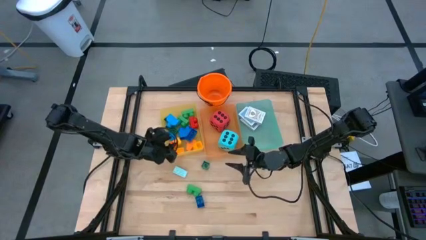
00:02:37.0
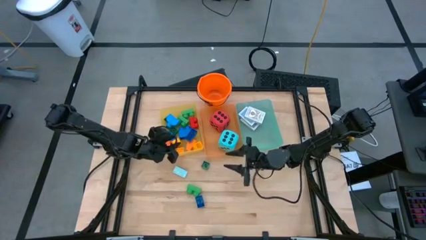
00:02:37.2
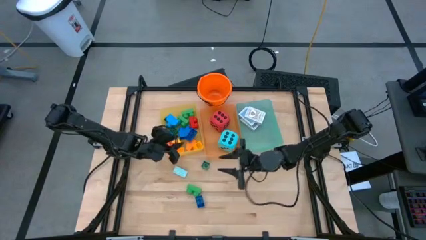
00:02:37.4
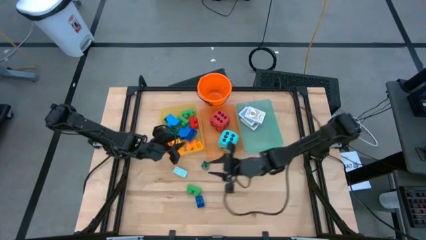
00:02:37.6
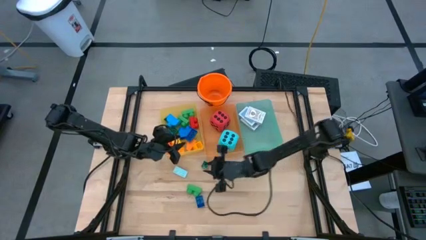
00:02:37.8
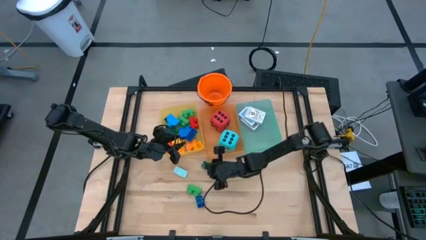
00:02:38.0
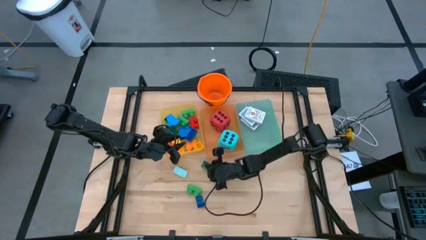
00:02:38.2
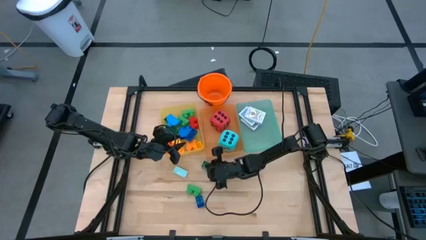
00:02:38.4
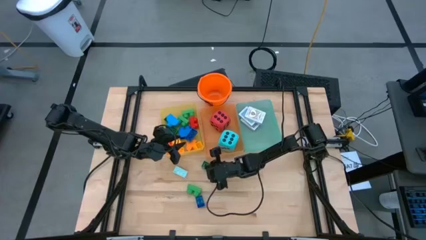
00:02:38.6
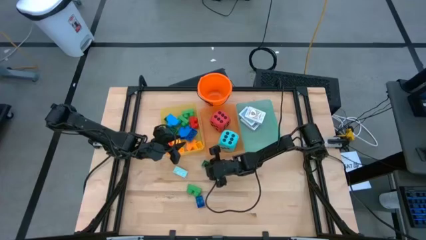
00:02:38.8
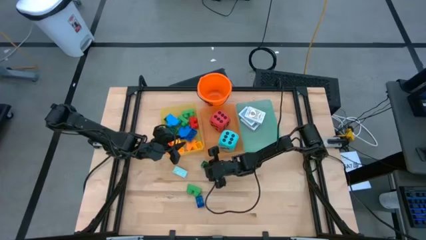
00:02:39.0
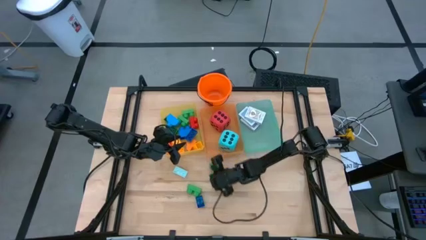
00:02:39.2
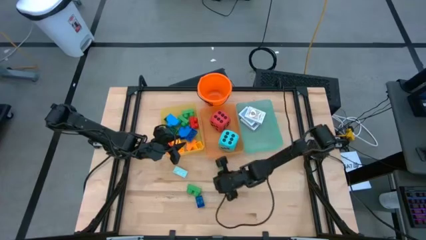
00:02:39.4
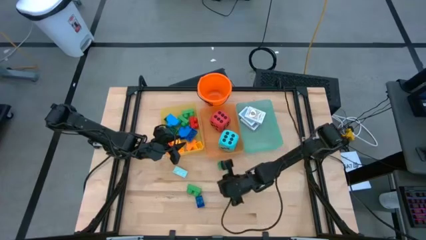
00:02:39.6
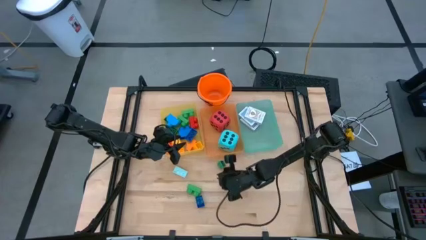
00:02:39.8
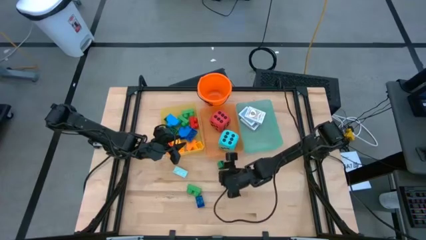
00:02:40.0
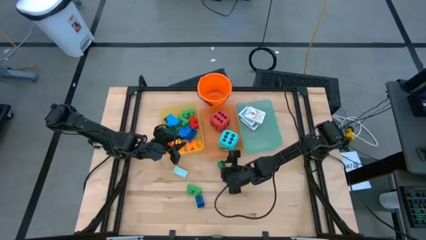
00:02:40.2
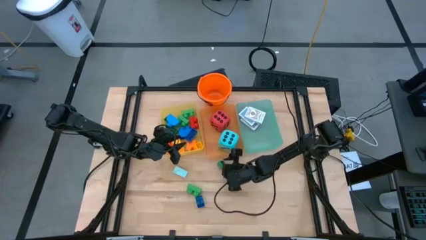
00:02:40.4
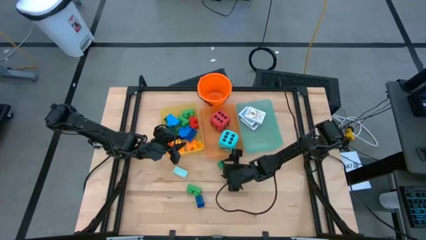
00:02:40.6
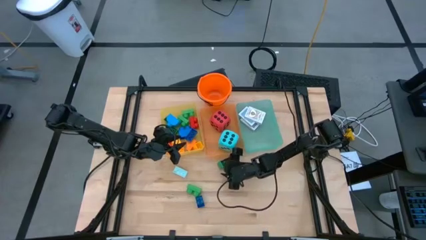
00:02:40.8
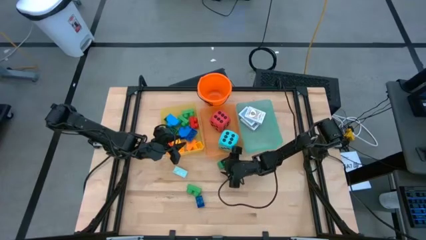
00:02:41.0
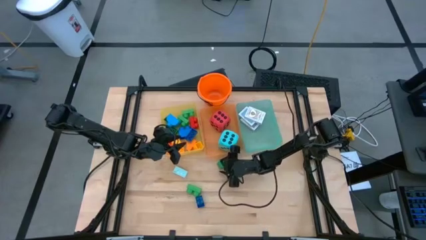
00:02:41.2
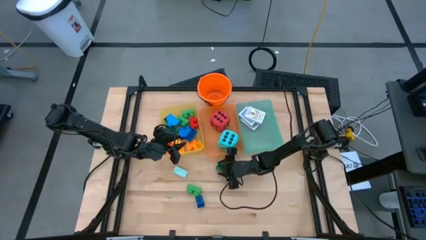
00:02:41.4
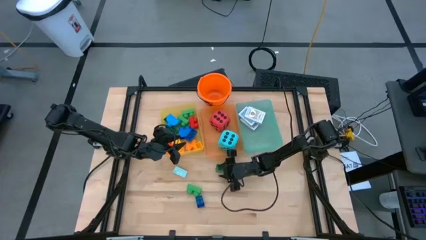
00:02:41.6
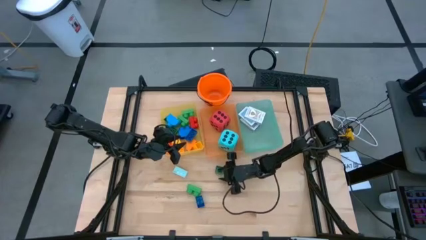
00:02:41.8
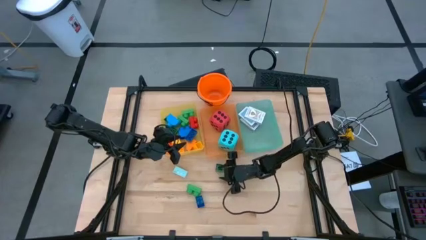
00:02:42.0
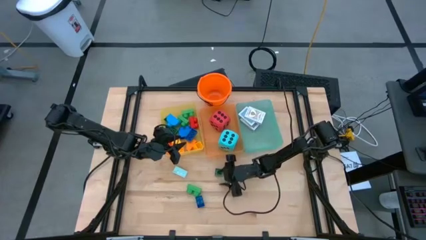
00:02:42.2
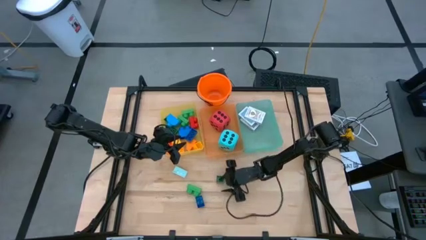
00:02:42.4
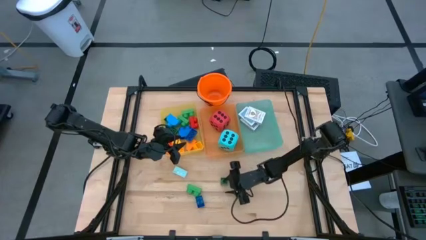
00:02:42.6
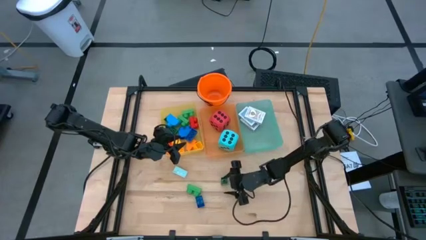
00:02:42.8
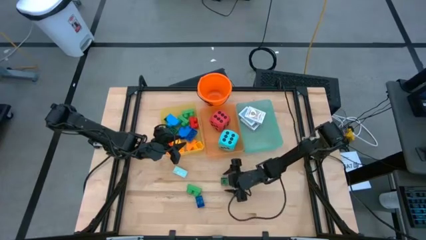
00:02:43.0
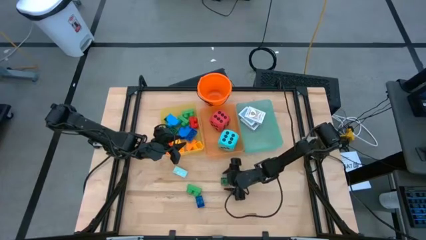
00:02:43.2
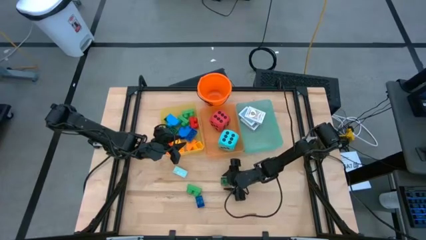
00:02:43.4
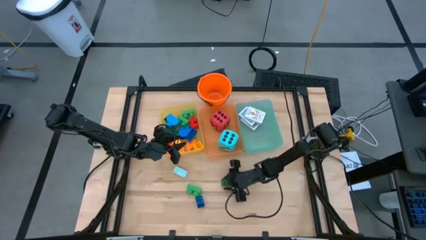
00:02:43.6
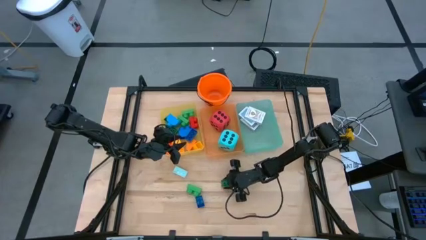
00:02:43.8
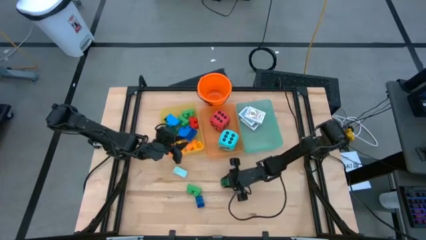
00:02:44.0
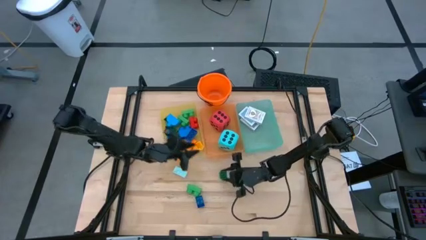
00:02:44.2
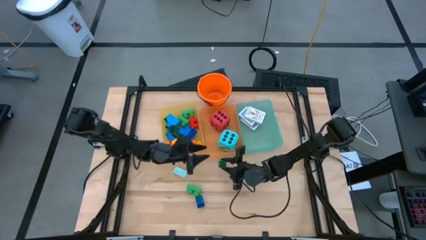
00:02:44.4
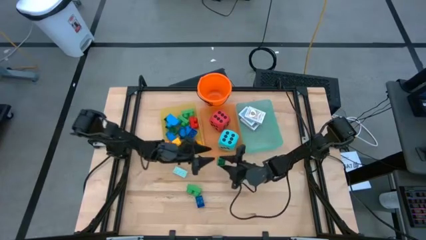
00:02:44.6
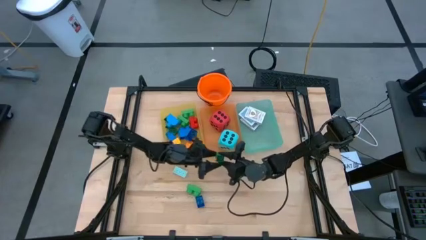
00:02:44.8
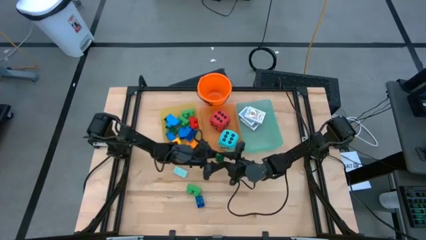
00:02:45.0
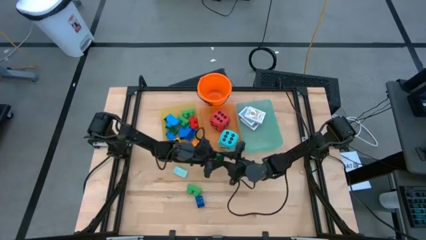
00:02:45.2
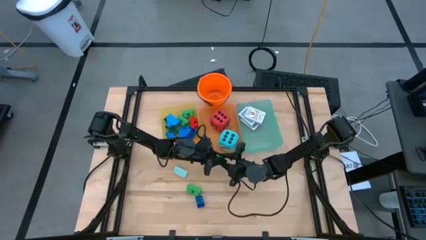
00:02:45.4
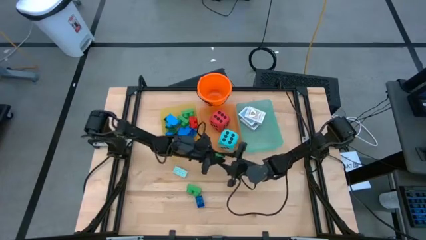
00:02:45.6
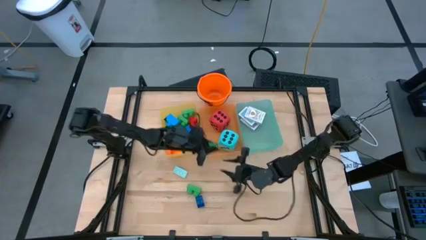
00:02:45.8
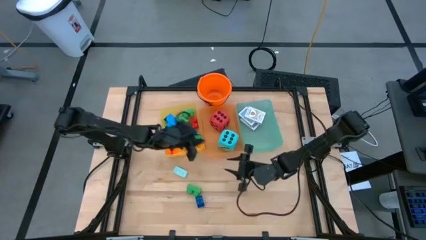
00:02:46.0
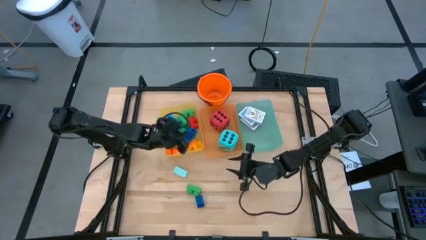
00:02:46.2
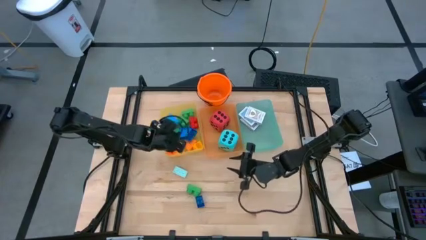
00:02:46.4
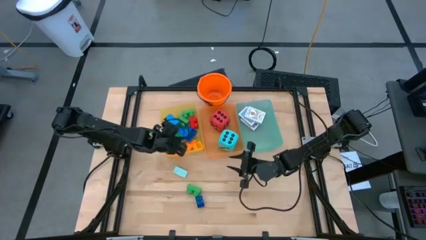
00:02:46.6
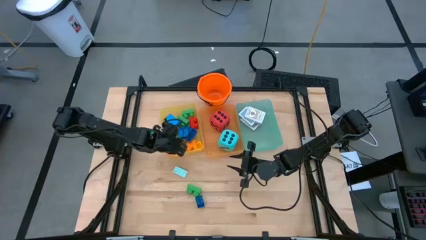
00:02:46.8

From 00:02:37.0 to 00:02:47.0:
Task: Pick & Place Toys
Put the green game piece into the yellow bin

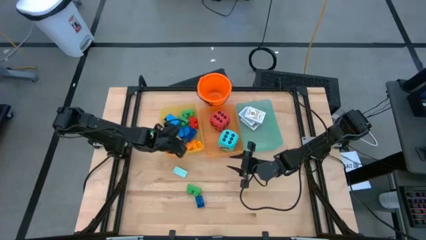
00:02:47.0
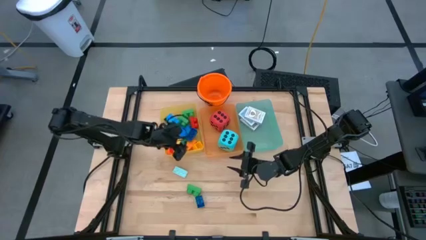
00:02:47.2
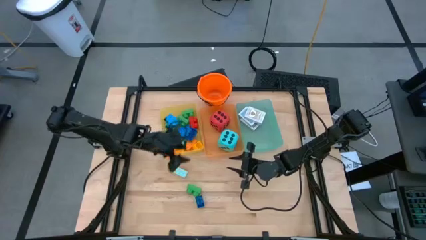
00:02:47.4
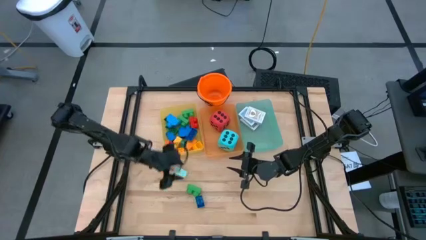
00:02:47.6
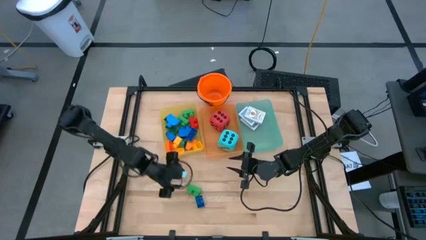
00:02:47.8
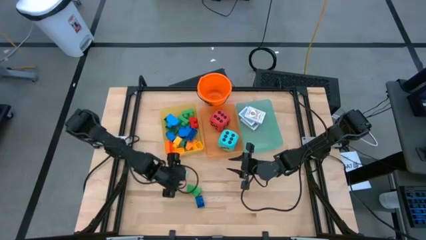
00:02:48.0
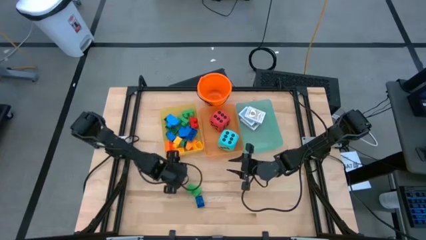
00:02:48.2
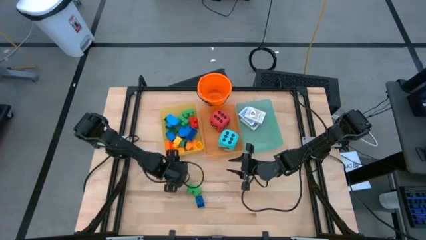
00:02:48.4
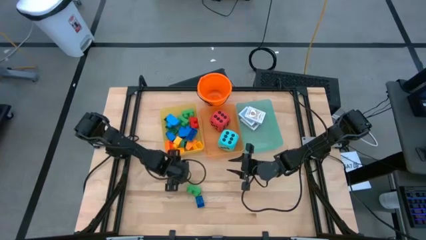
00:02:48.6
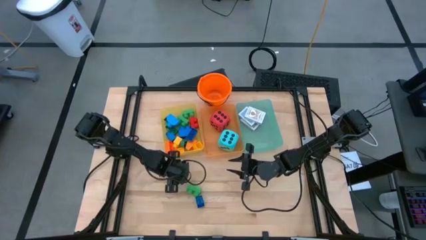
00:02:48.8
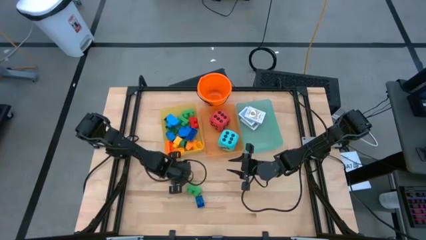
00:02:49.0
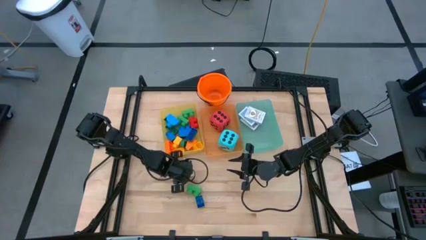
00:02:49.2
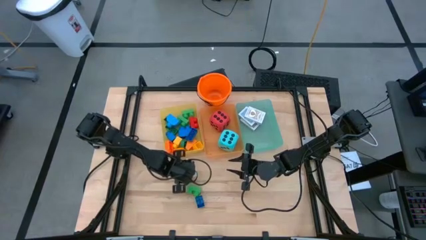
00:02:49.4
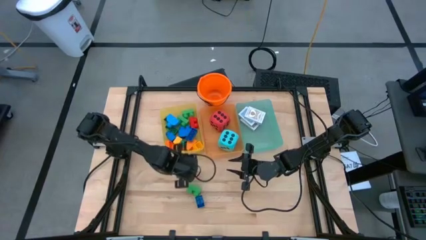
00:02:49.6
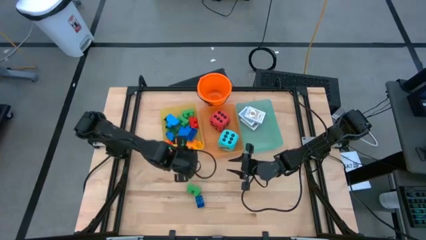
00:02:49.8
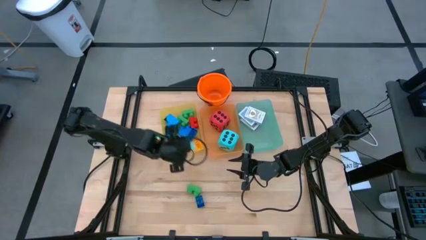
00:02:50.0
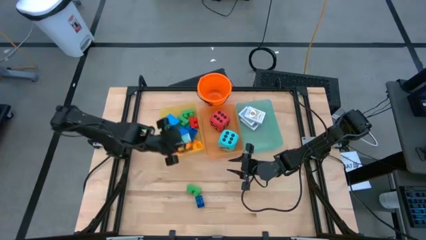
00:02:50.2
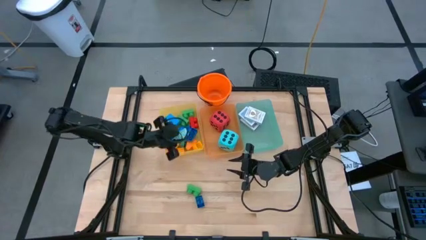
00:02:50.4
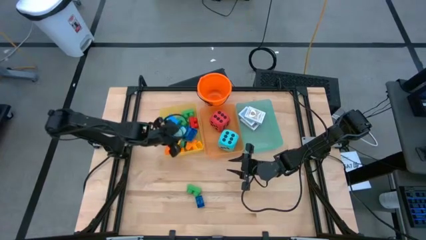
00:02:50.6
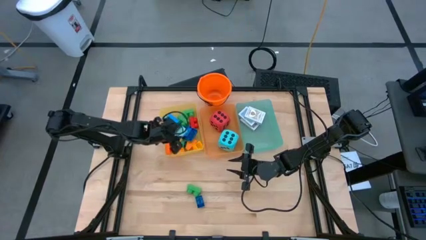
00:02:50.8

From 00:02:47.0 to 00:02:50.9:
Put the light blue game piece into the yellow bin

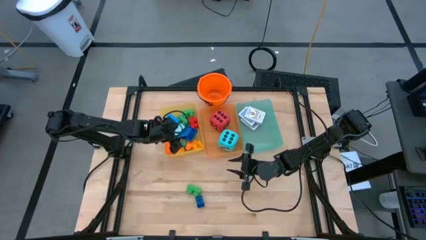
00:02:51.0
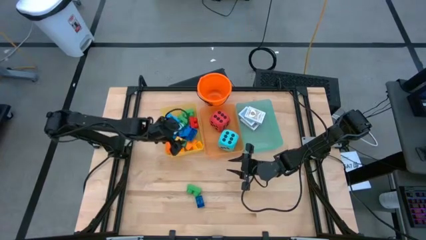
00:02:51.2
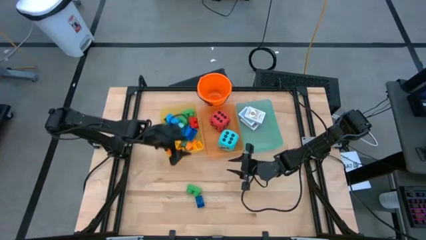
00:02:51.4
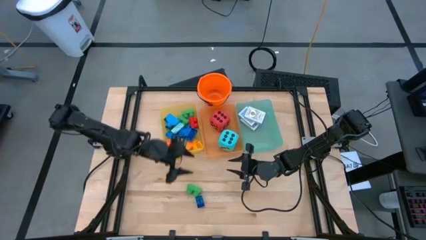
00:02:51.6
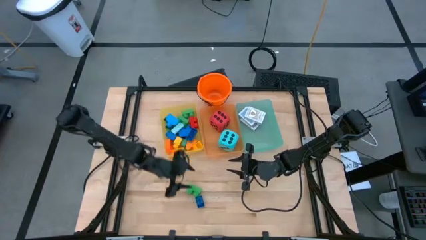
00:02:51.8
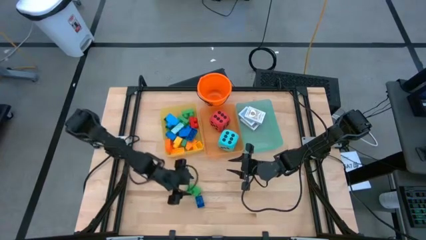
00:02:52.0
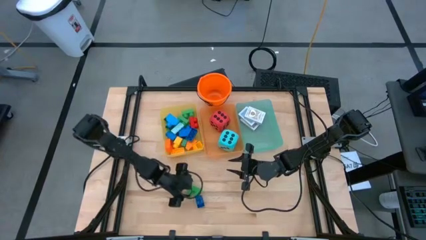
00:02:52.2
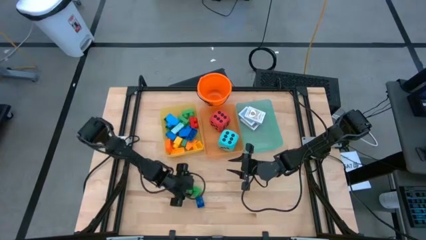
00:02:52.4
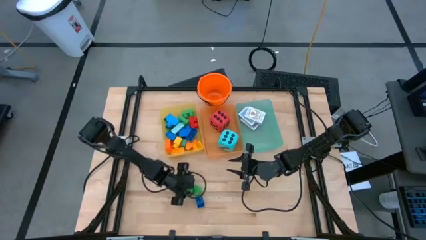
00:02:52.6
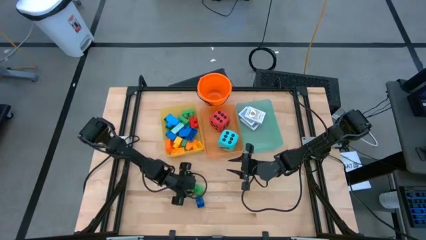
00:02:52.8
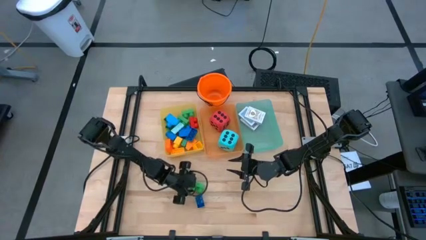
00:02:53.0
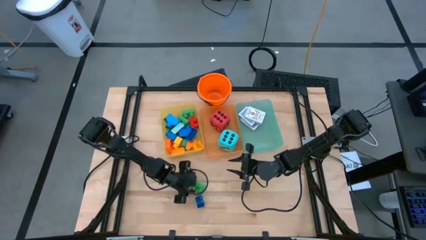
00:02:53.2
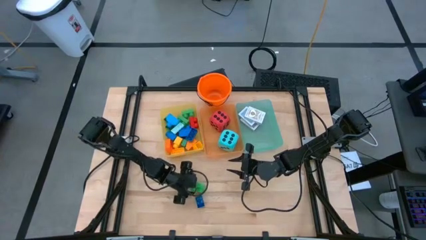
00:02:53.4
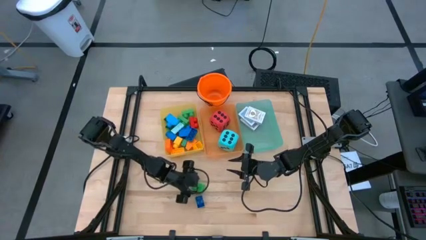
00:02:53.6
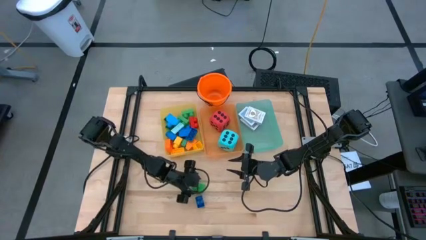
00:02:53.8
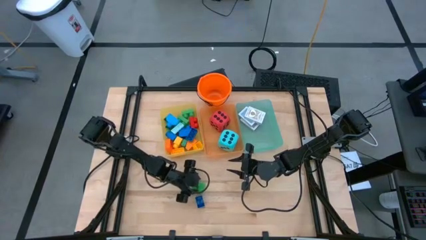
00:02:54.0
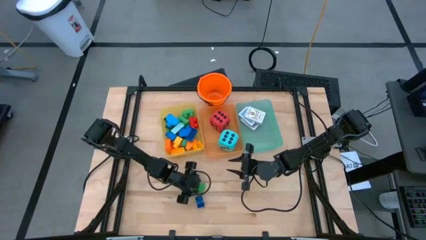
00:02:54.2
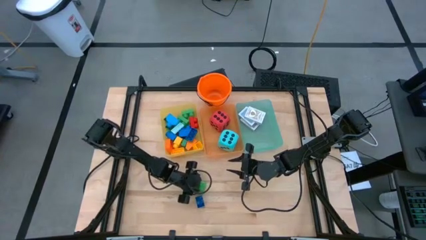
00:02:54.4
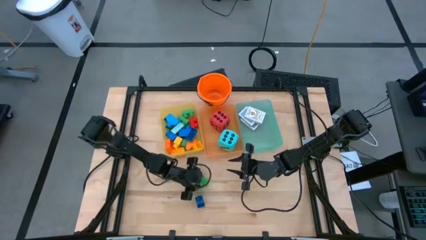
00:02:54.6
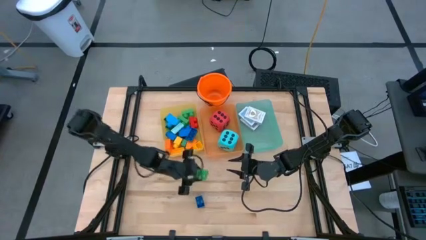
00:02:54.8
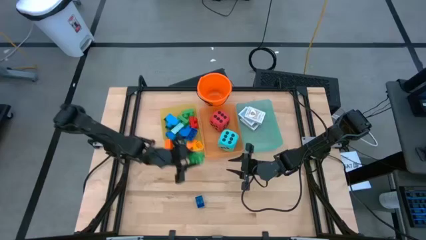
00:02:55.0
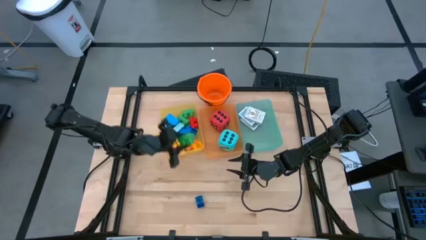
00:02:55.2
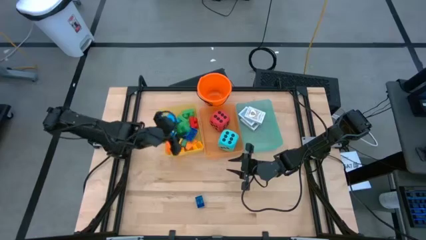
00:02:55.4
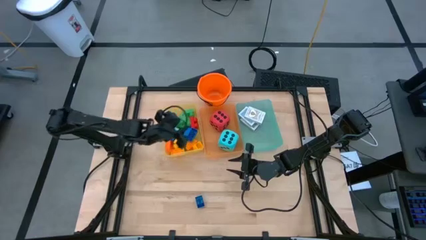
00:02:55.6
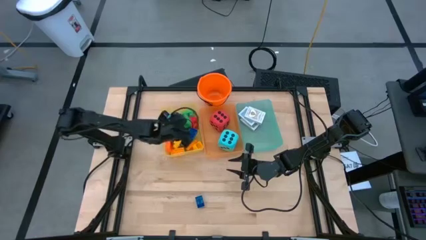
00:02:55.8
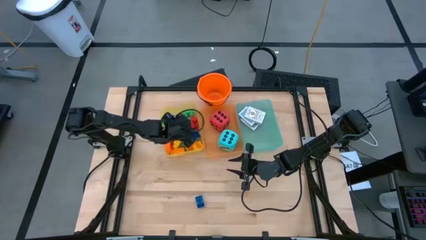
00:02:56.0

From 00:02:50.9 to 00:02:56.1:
Put the green game piece into the yellow bin
